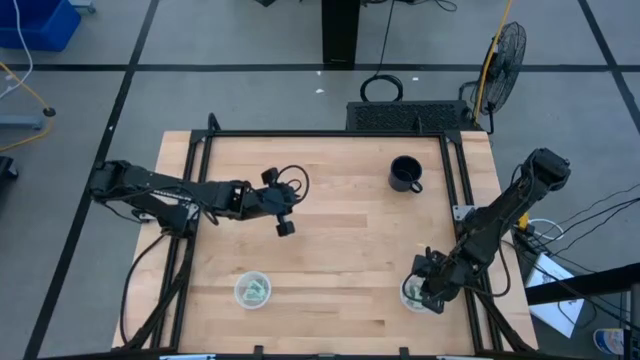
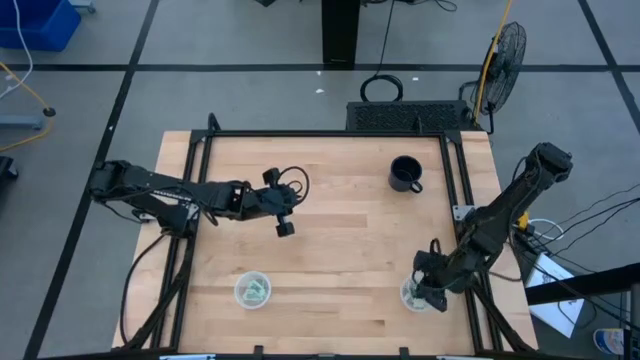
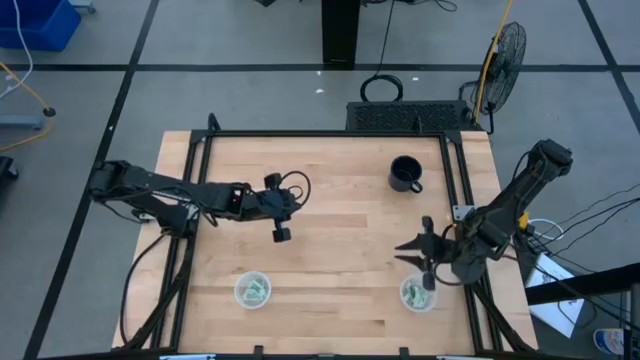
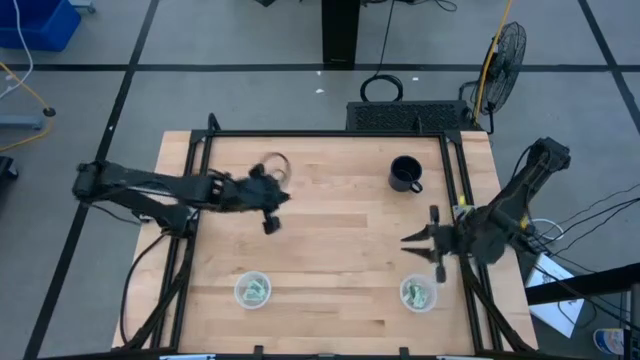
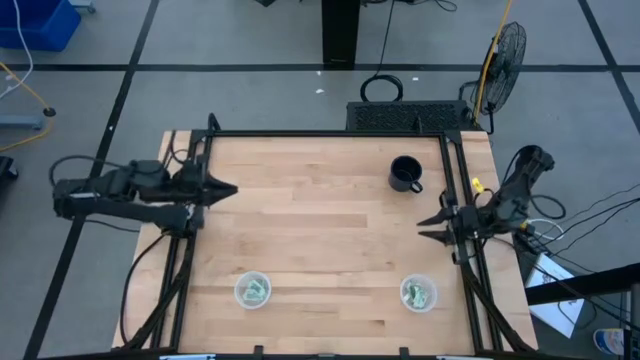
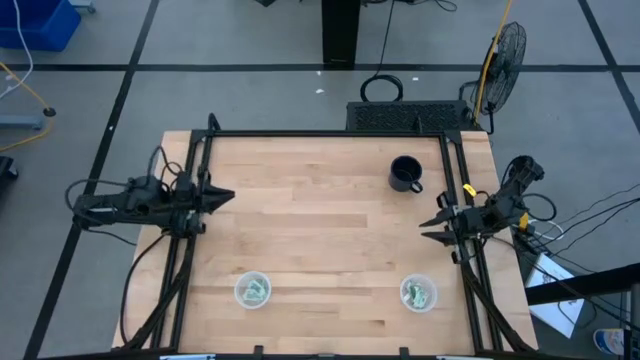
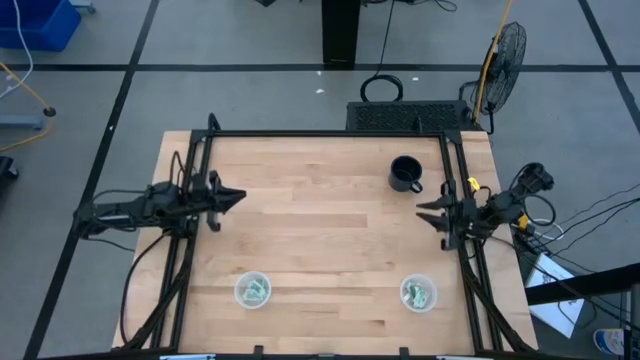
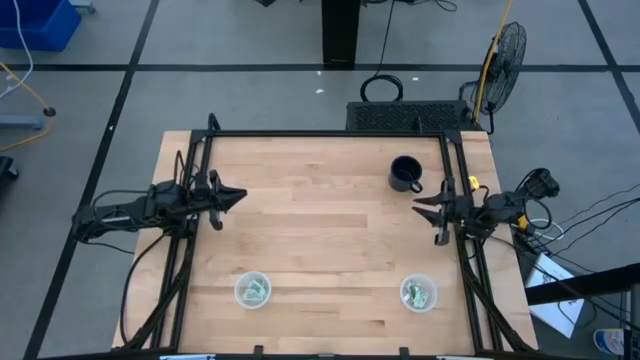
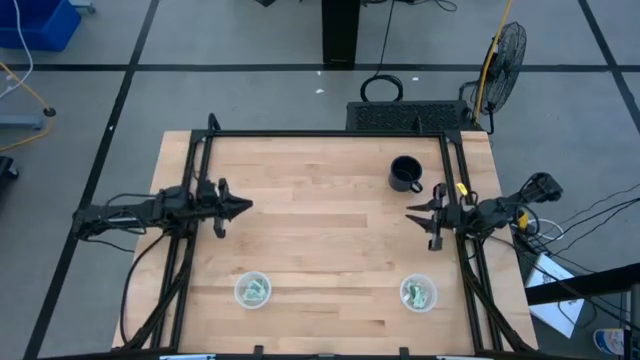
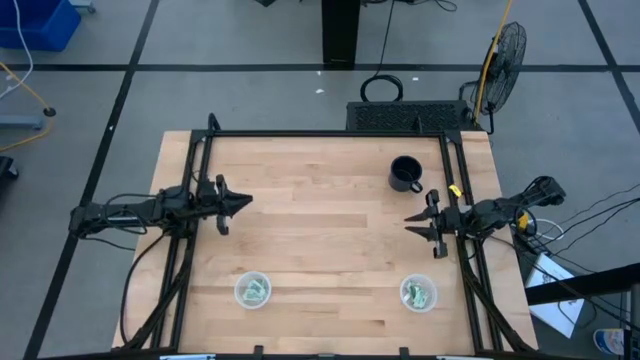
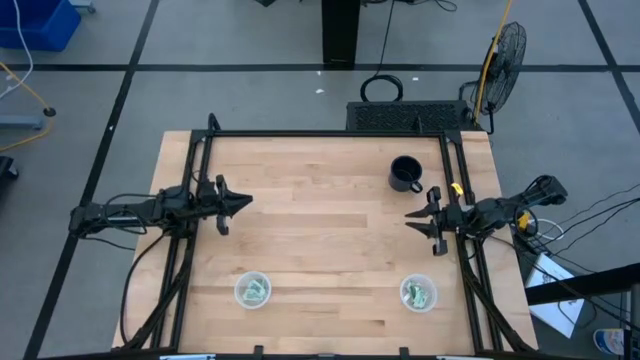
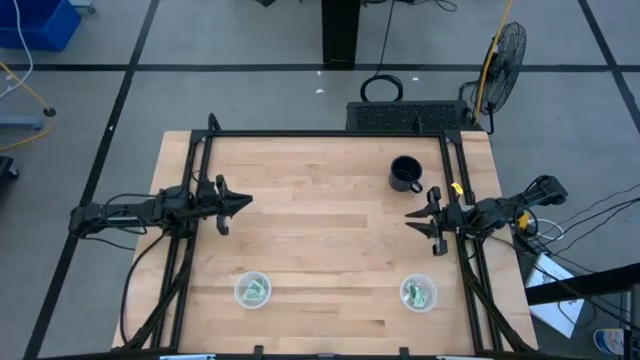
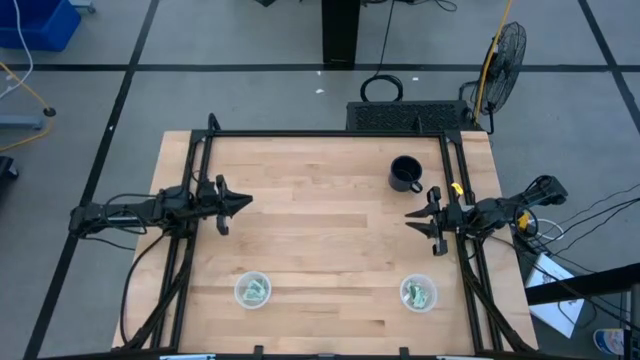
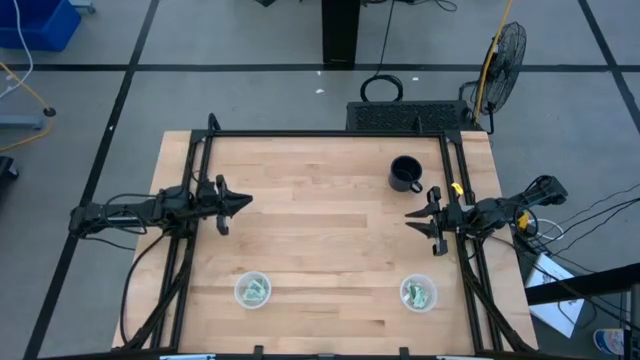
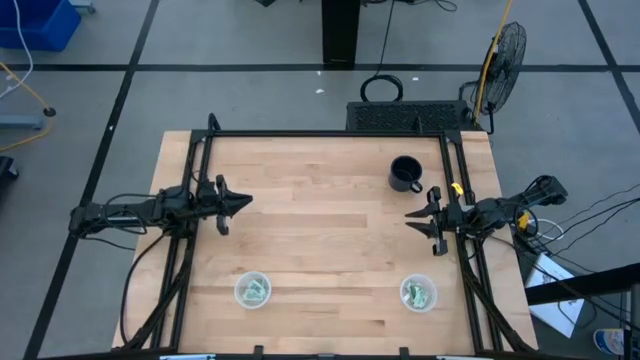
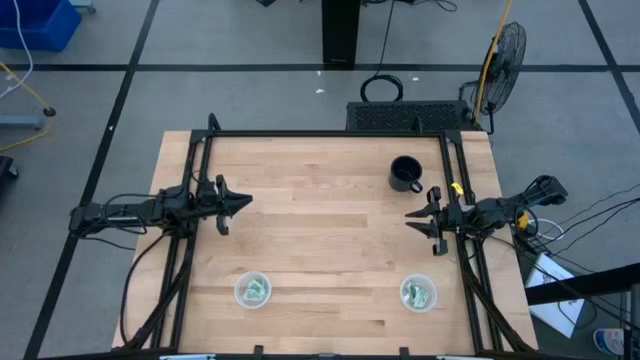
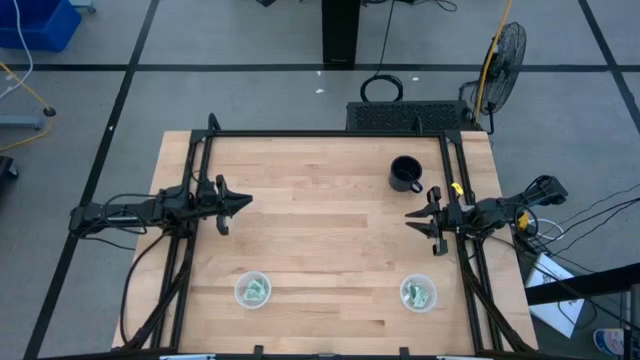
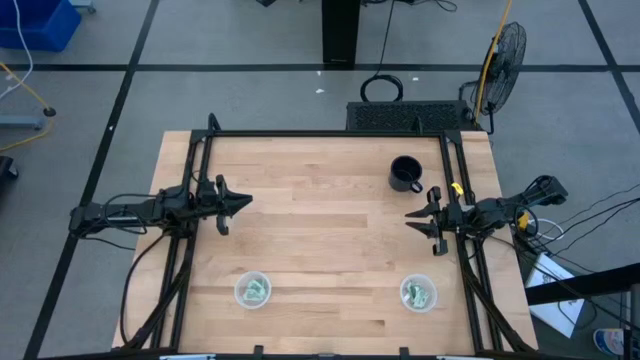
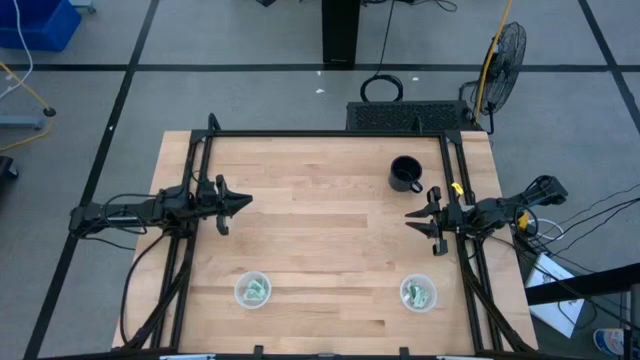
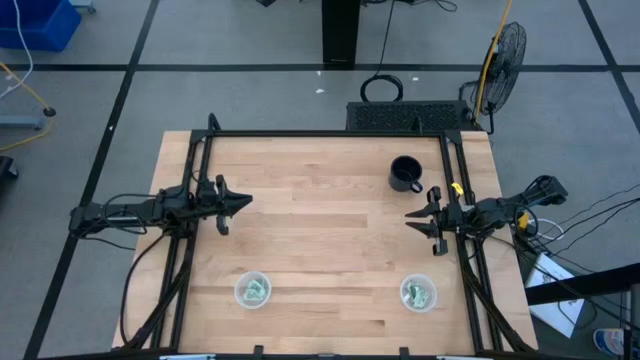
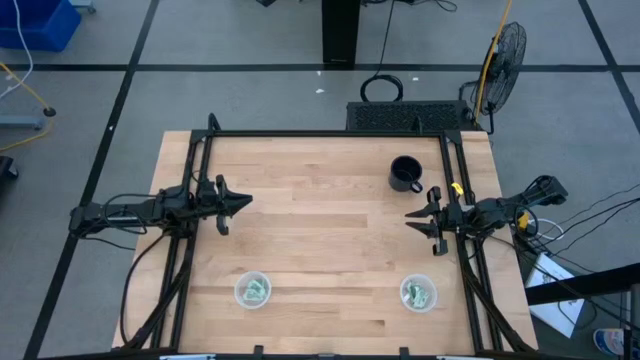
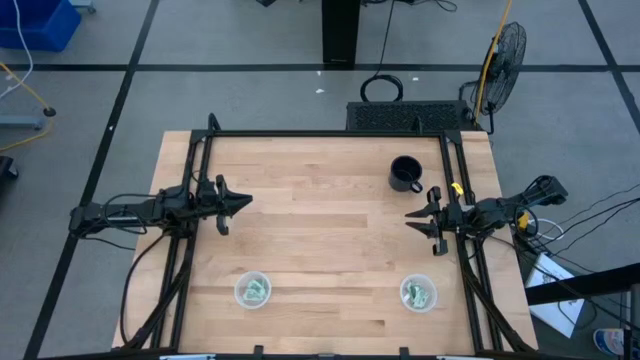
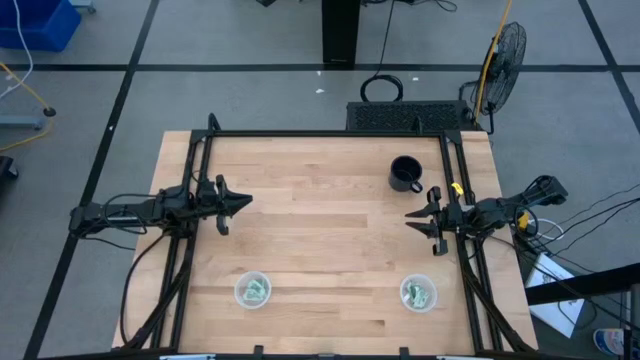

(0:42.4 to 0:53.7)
Task: Pick and place Stevia / Truvia into bins
Return to Home Position

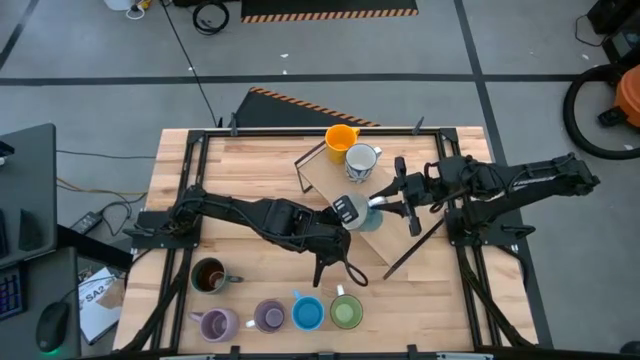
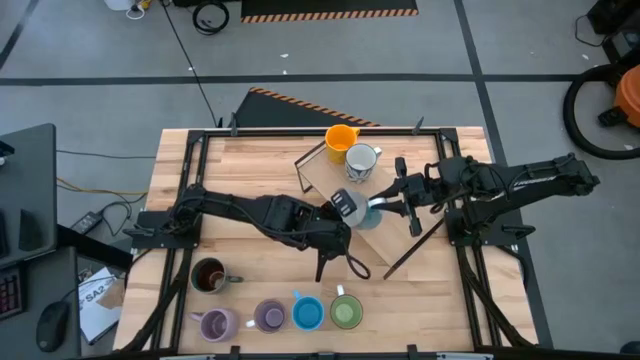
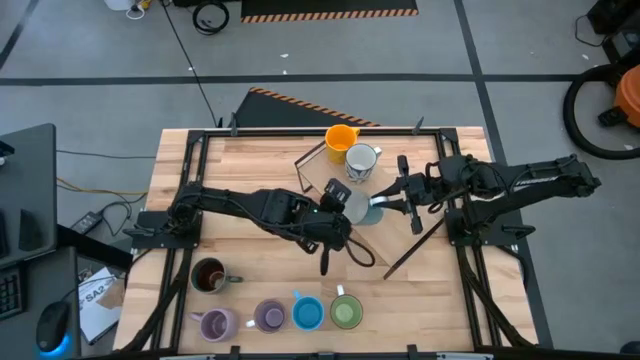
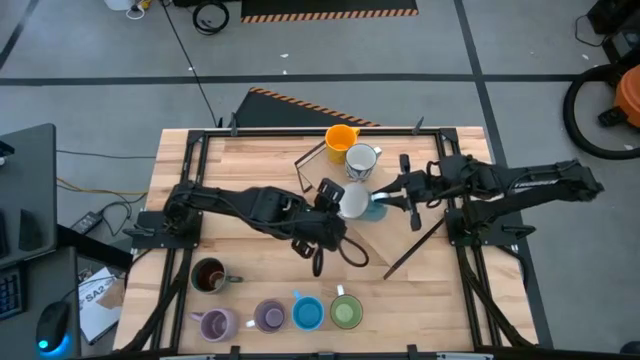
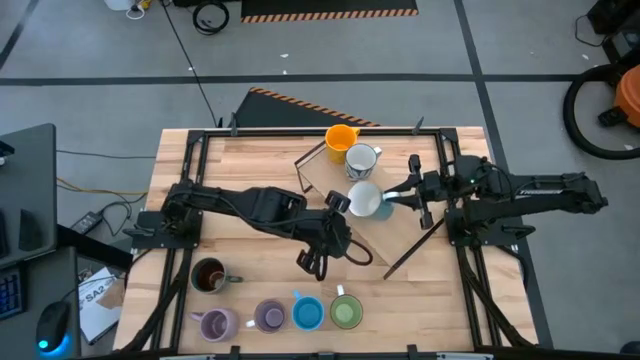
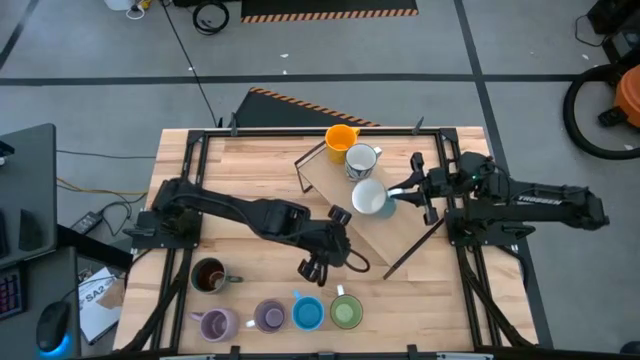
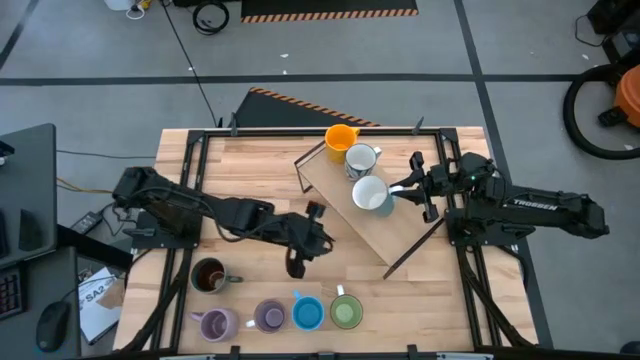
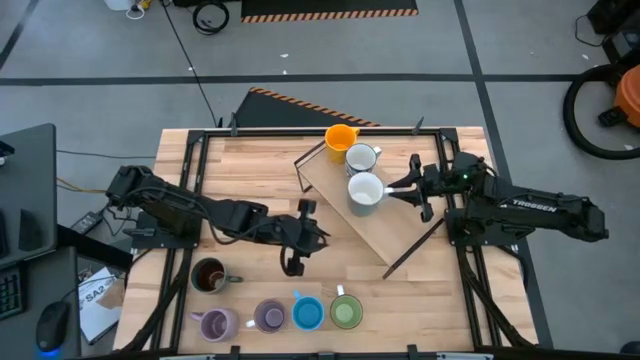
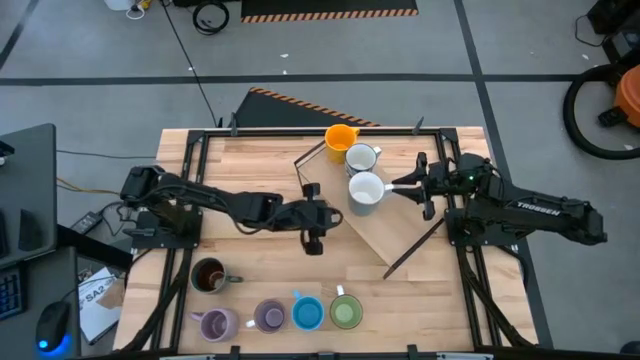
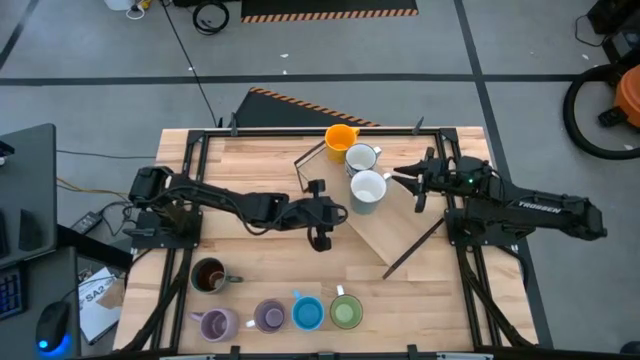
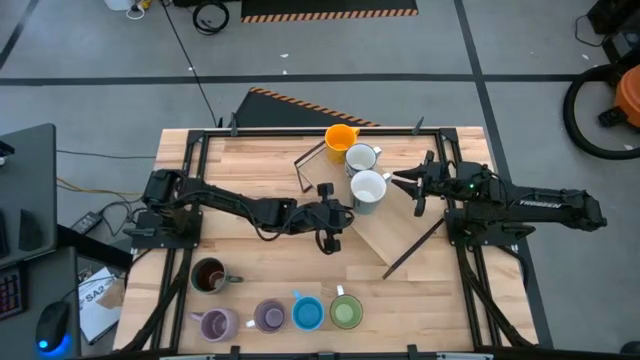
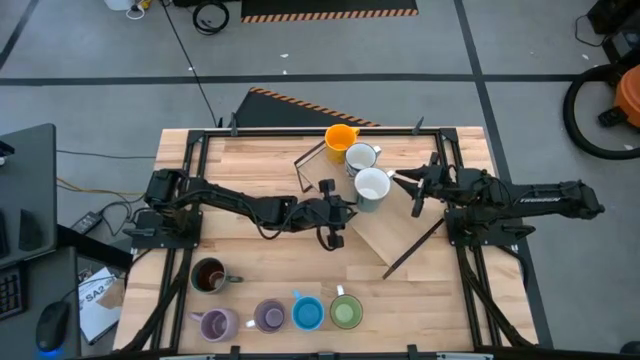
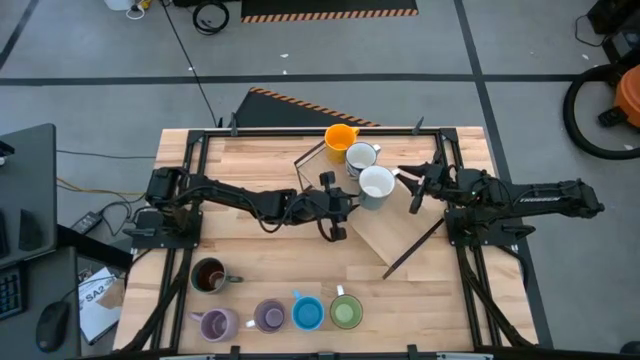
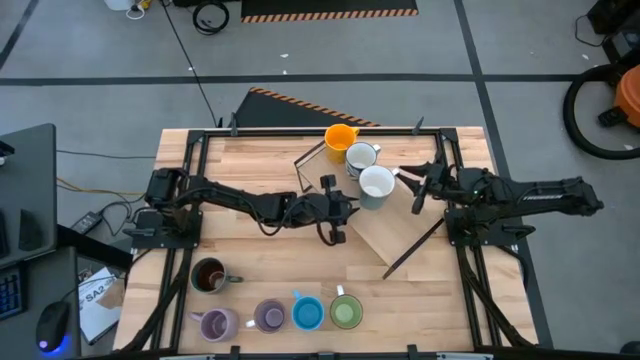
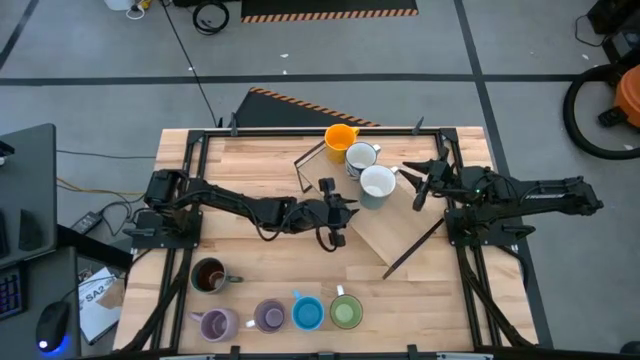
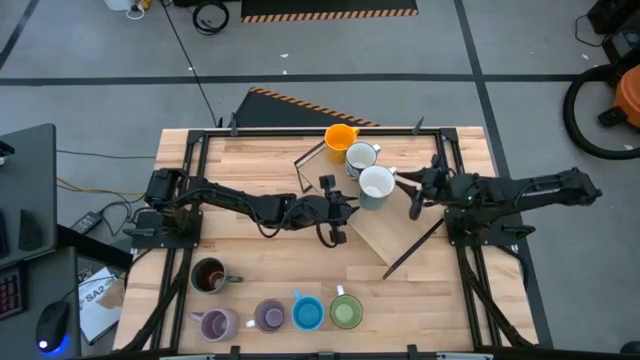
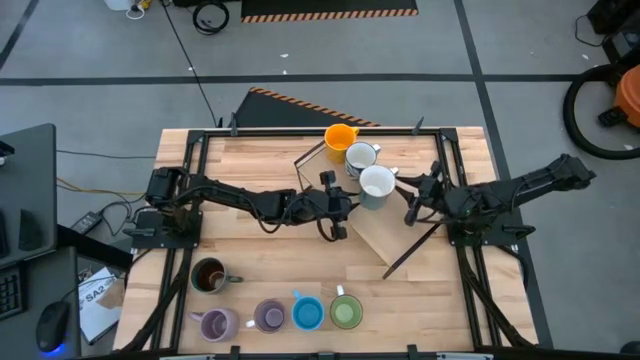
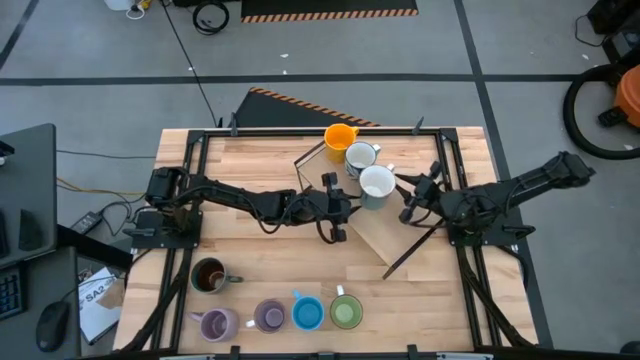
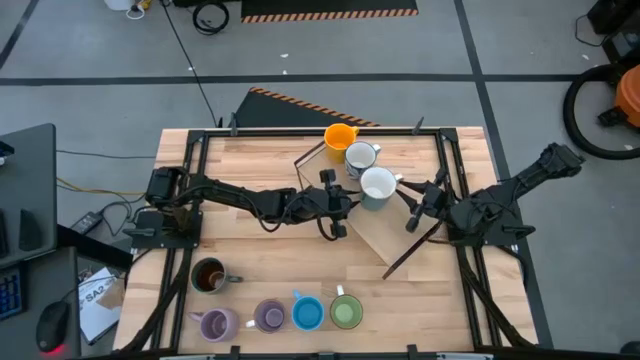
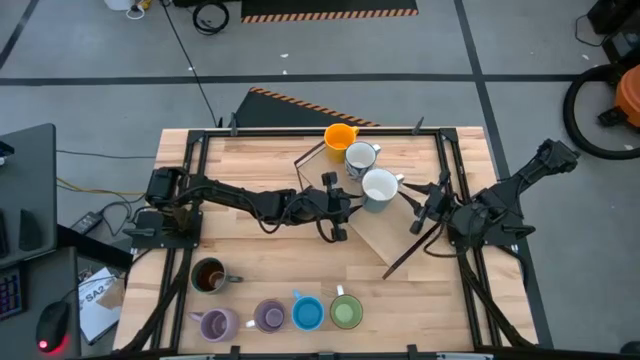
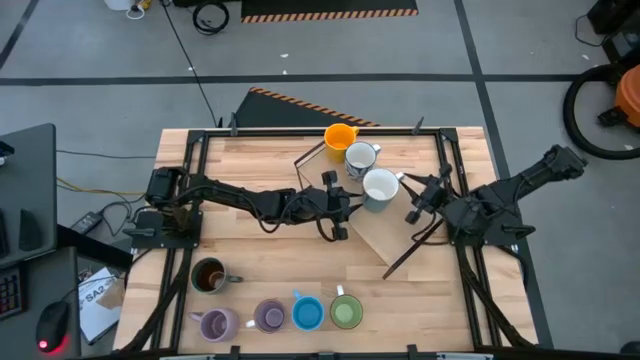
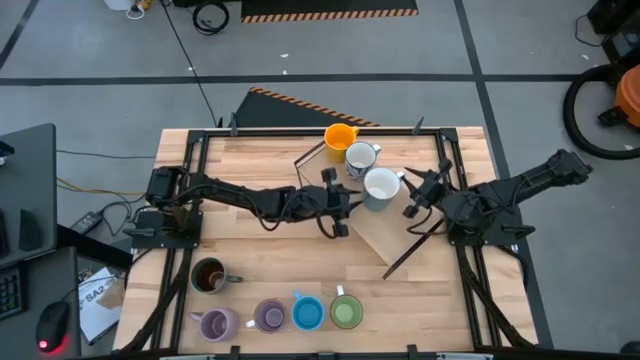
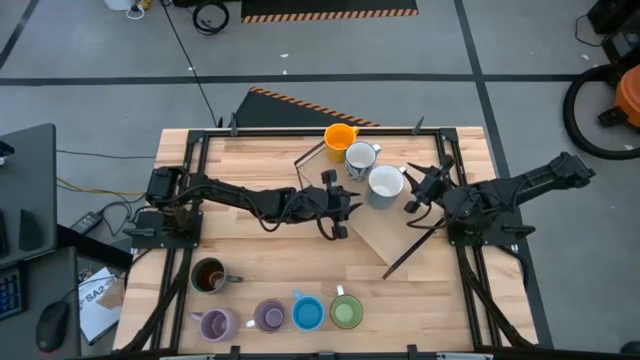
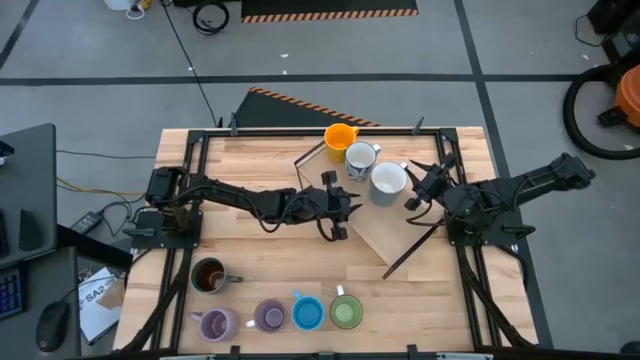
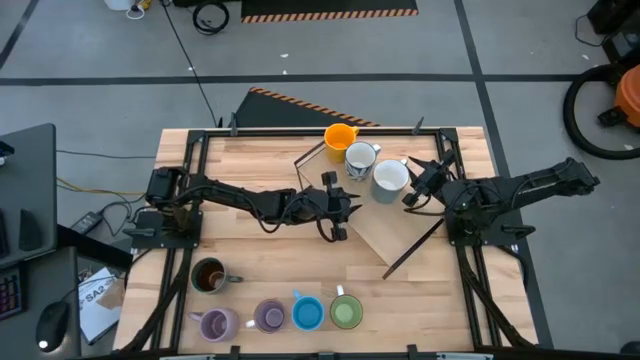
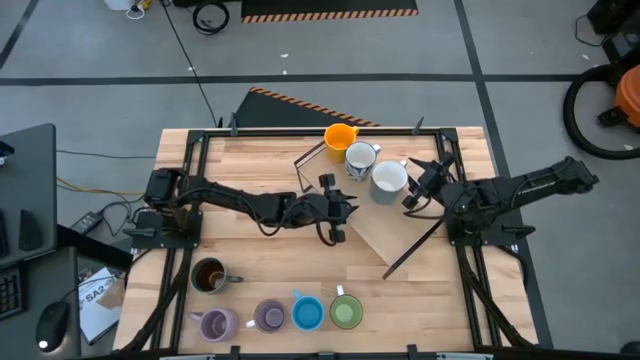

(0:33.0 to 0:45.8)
Task: Place coffee mugs
Put the light blue mug on the shelf
